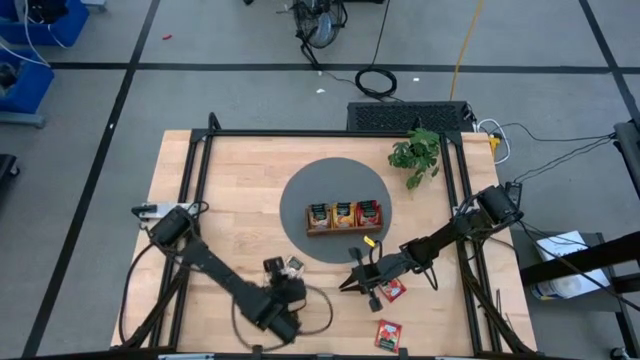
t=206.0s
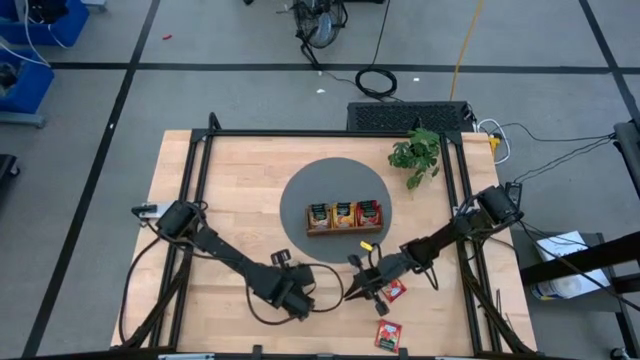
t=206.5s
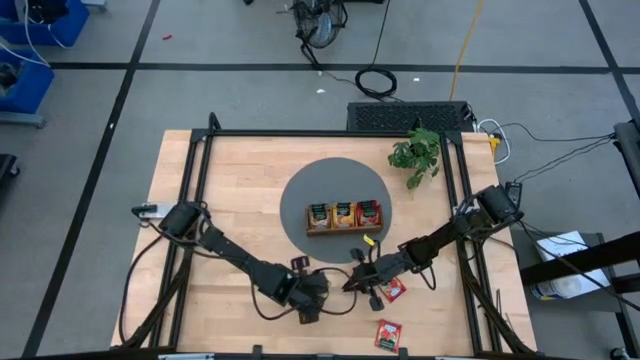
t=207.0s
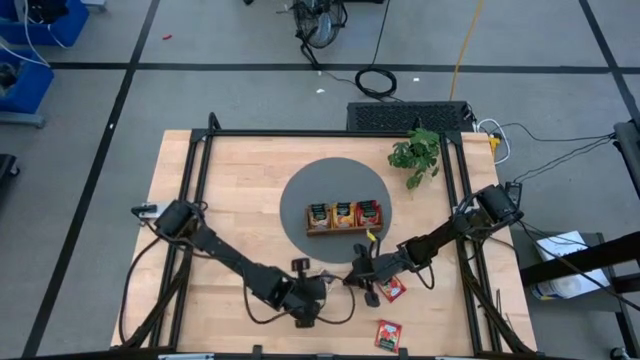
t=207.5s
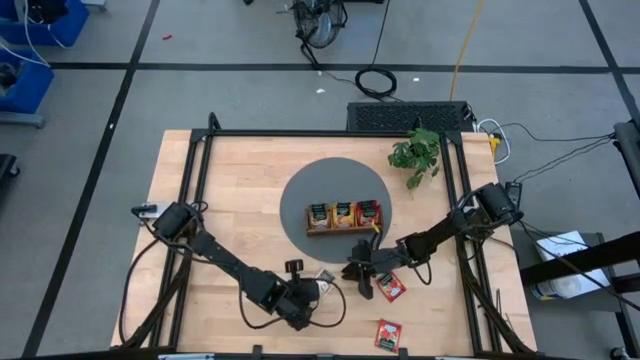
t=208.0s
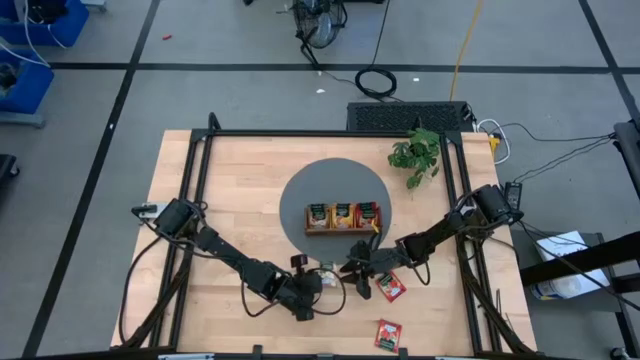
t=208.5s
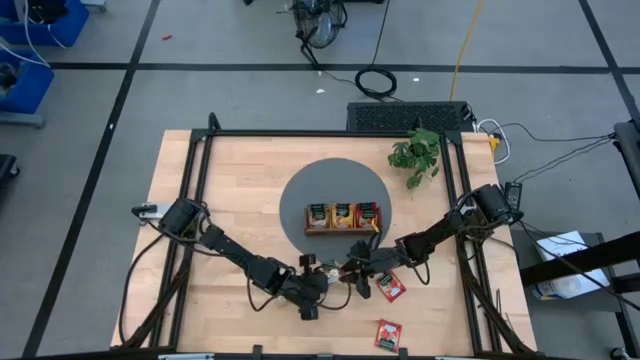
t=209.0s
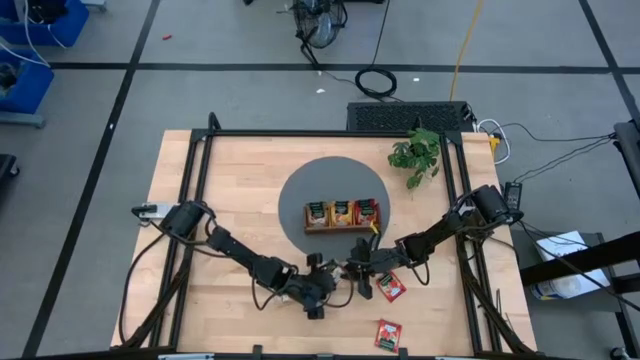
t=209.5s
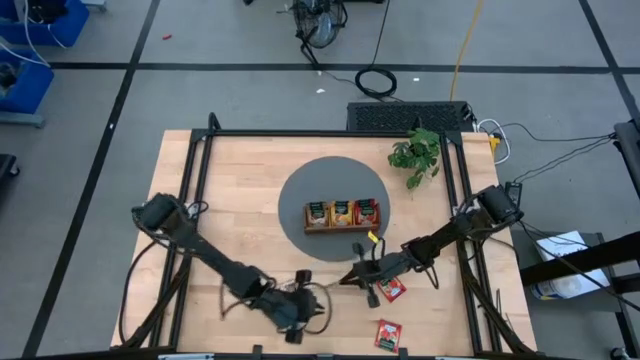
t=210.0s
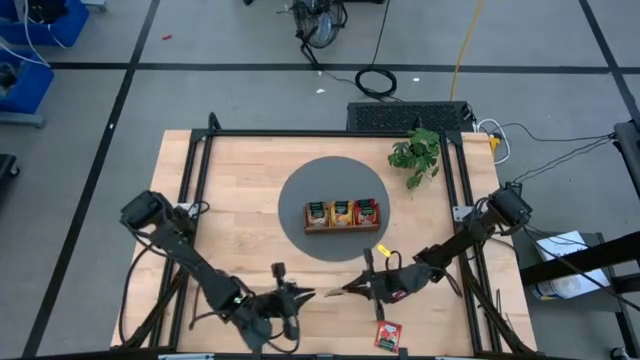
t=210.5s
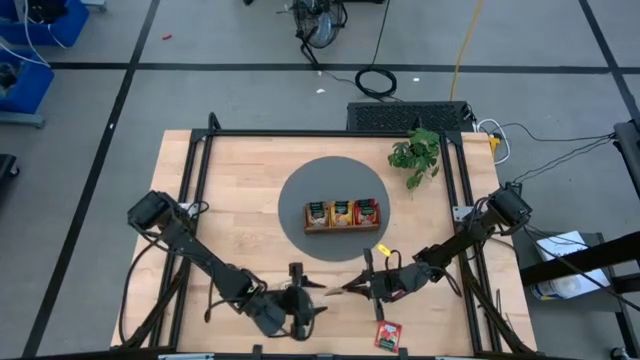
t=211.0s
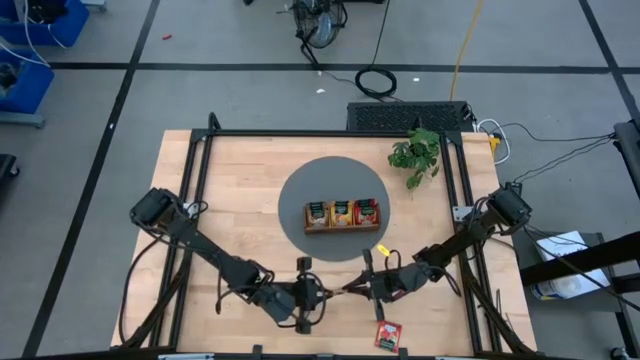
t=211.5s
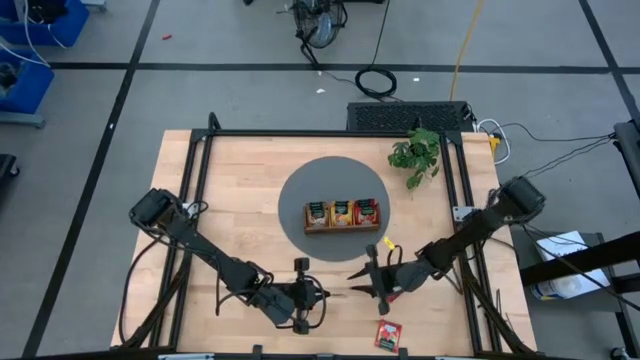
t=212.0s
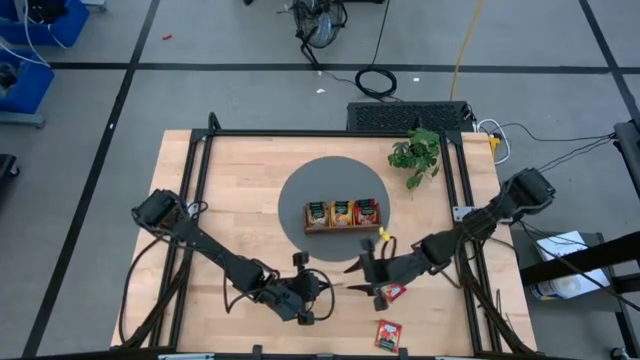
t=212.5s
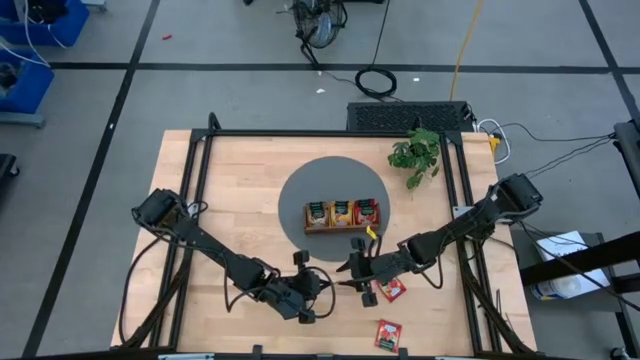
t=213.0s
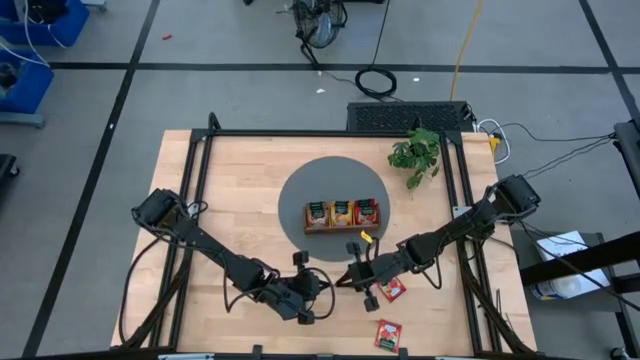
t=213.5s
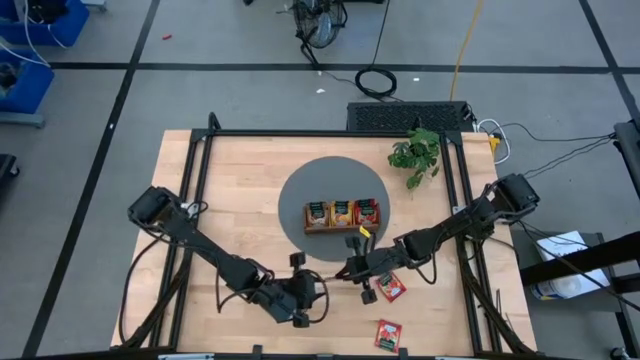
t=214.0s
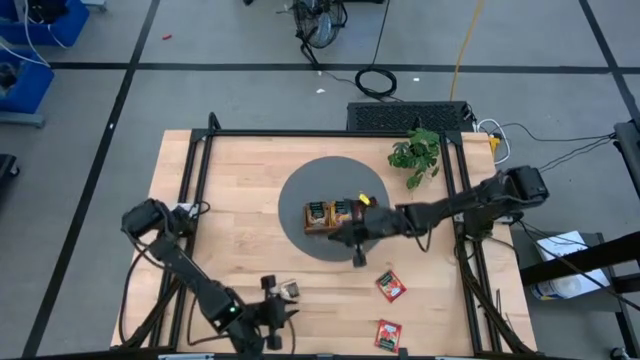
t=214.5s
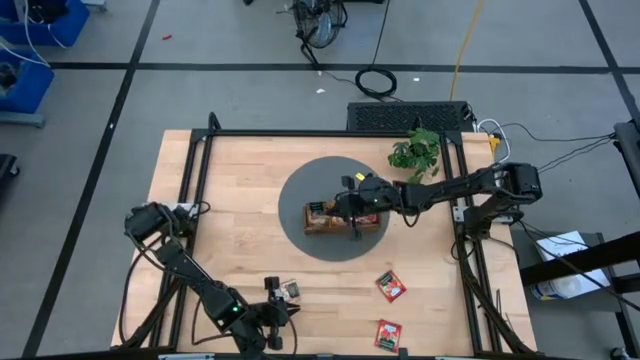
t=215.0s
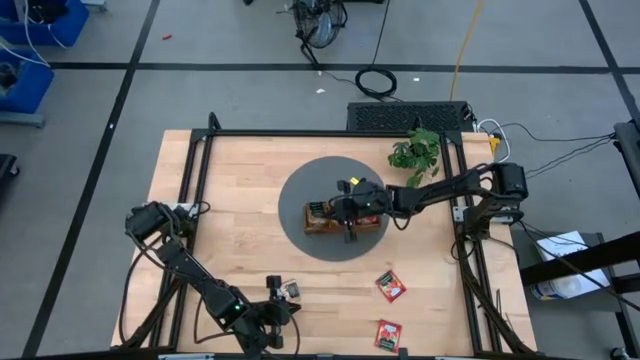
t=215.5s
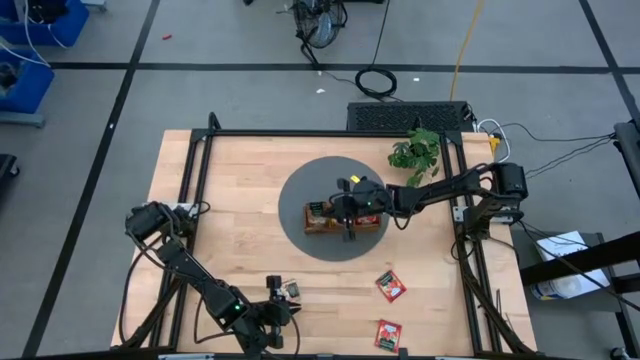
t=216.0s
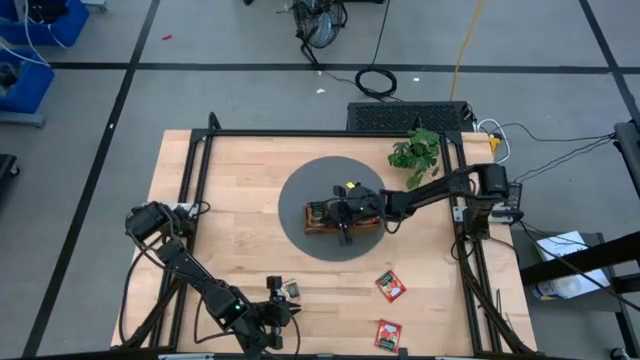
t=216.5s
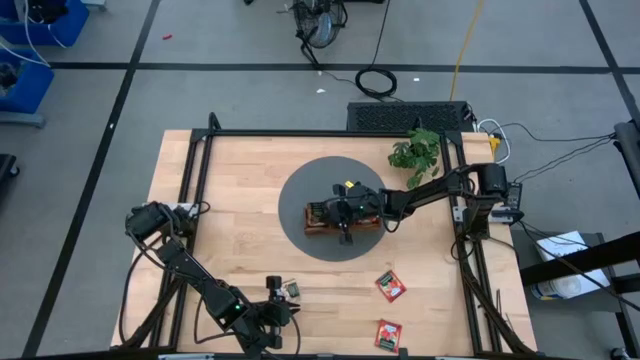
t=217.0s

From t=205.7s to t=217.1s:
Task: Pick & Place Tea
Put the top brown tea bag into the left slot of the wooden organizer

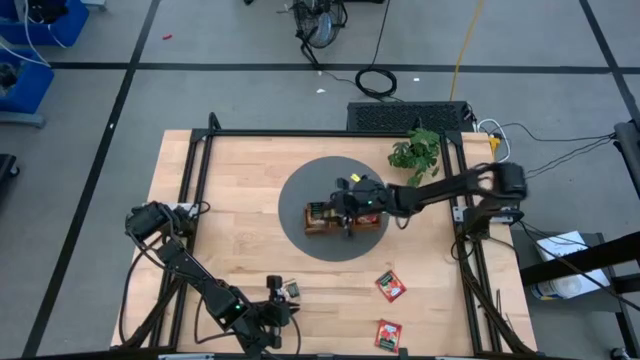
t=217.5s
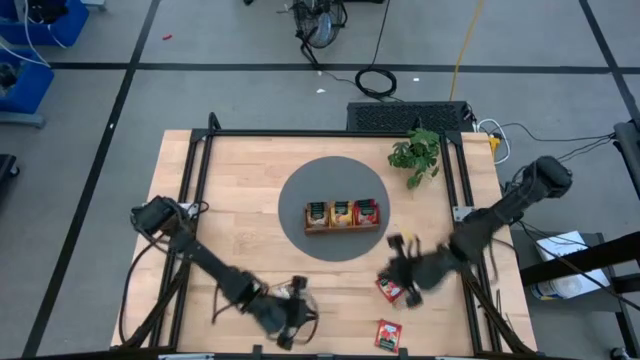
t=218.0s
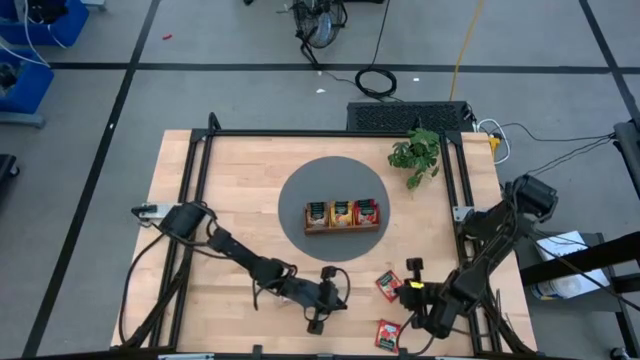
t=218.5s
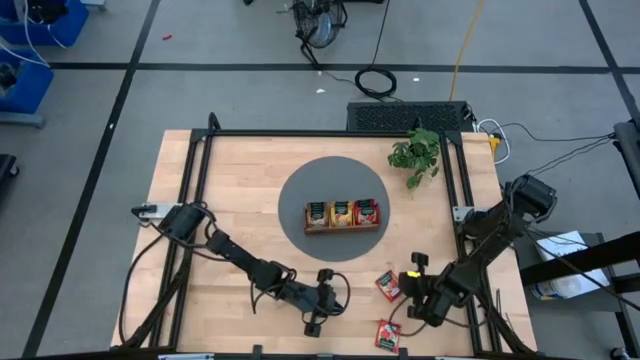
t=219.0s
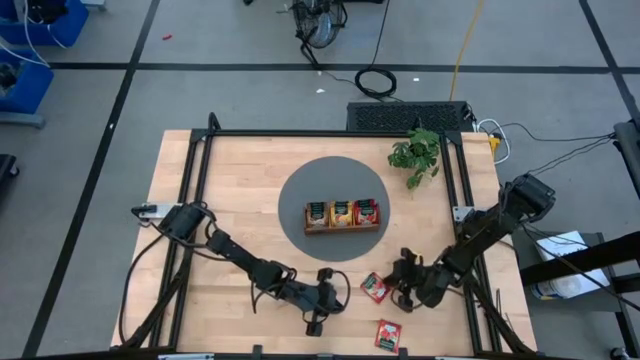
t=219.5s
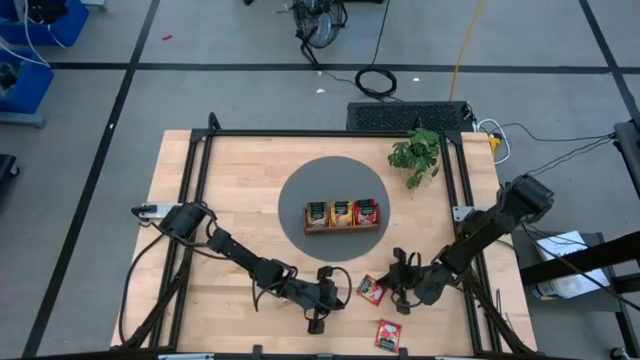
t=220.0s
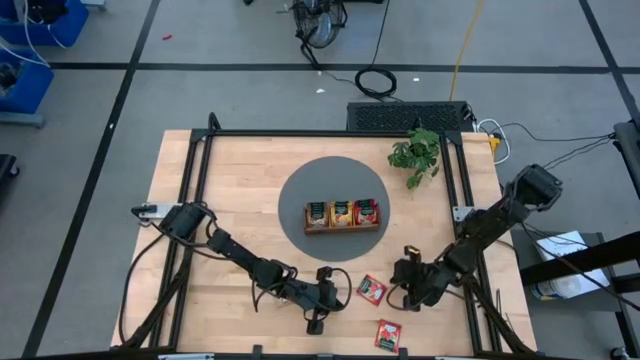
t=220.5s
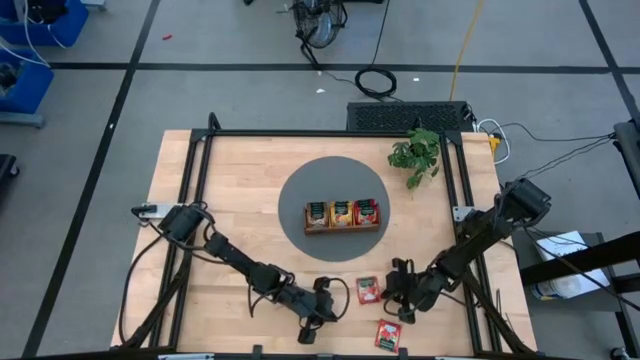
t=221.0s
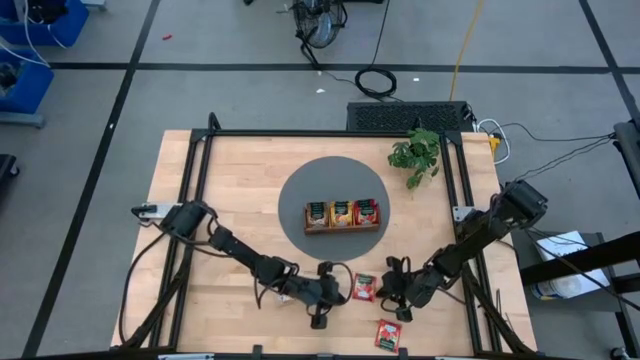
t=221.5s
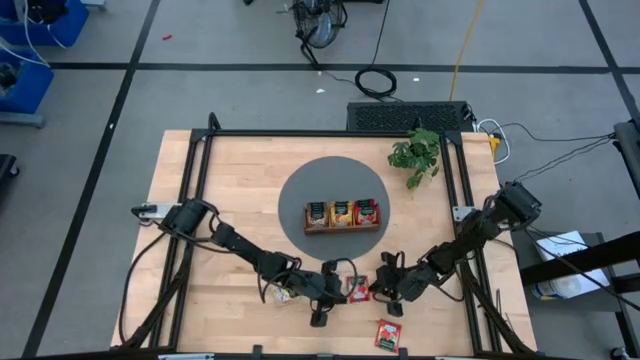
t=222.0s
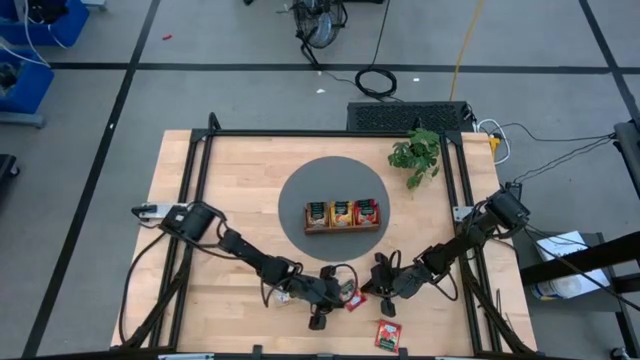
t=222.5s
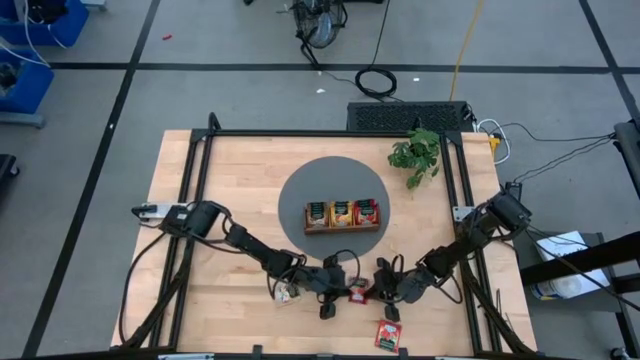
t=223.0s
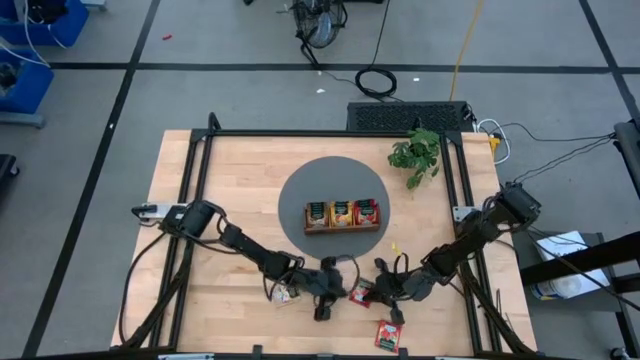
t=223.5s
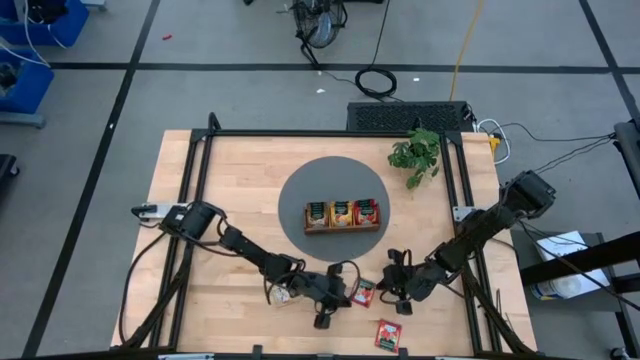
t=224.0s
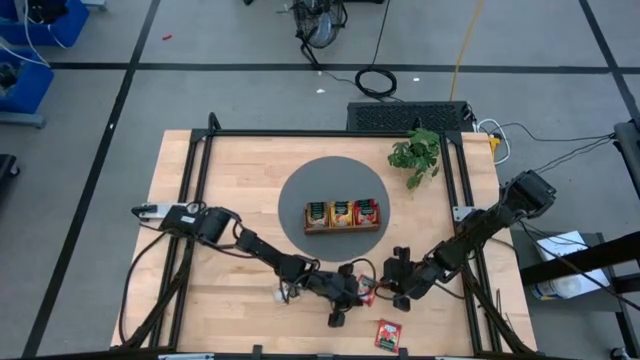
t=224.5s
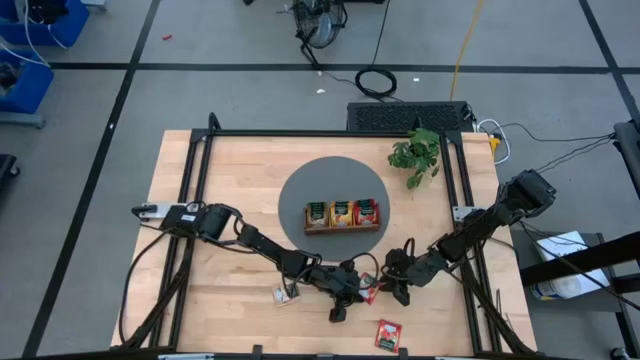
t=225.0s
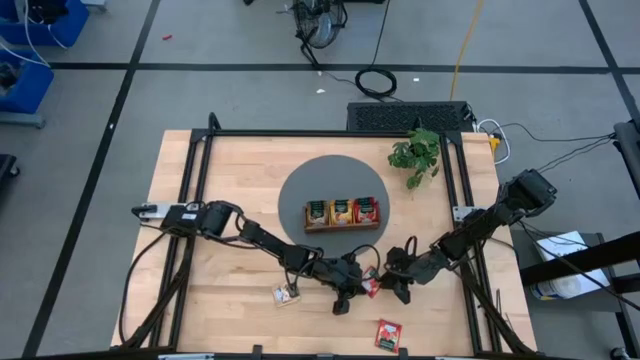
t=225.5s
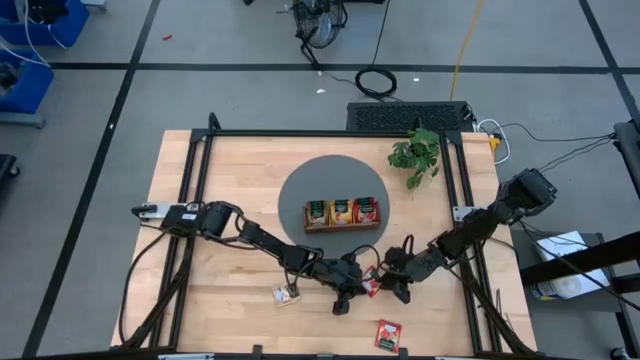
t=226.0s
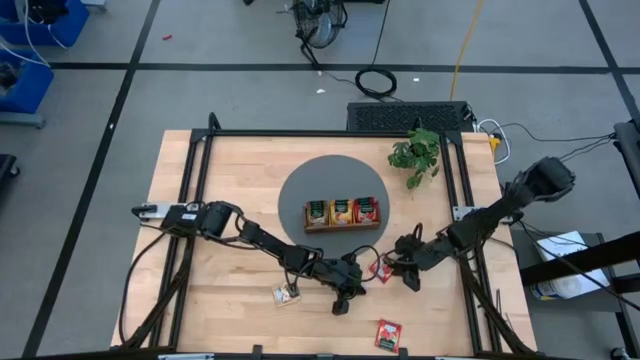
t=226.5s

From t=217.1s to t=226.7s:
Put the top red tea bag into the right slot of the wooden organizer

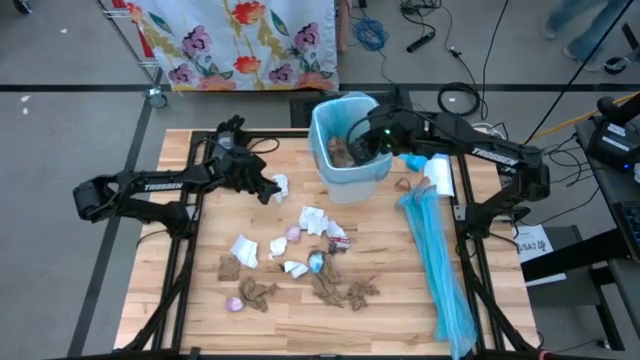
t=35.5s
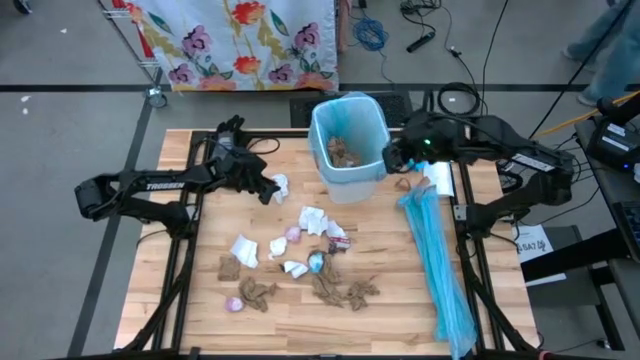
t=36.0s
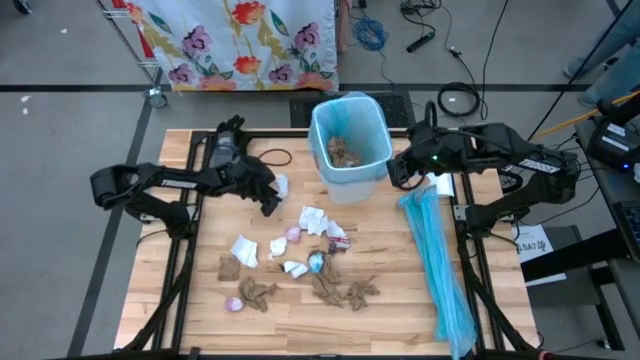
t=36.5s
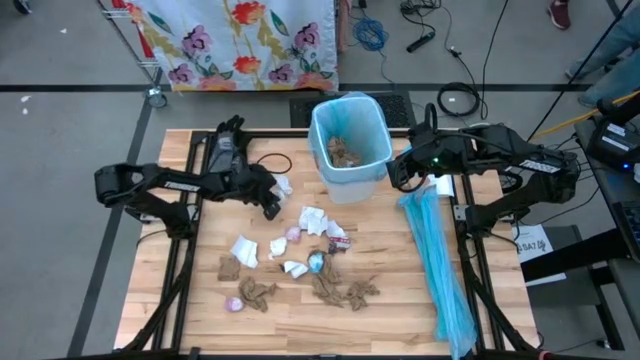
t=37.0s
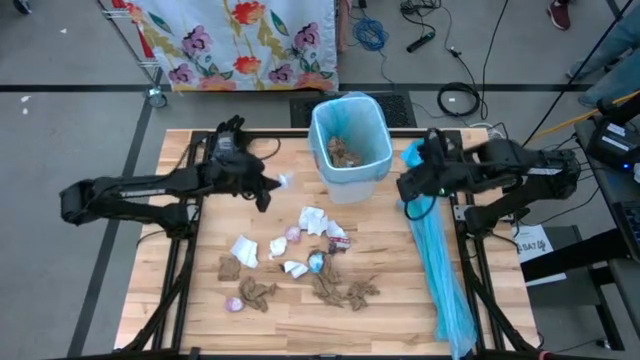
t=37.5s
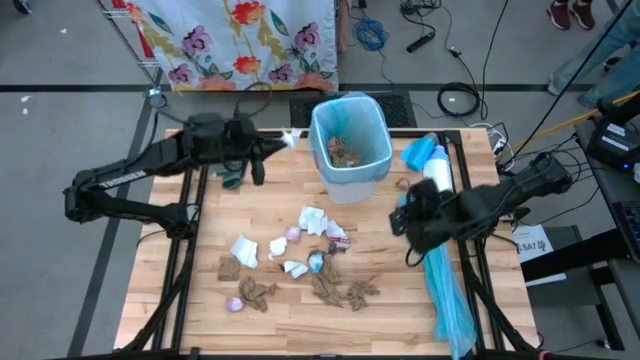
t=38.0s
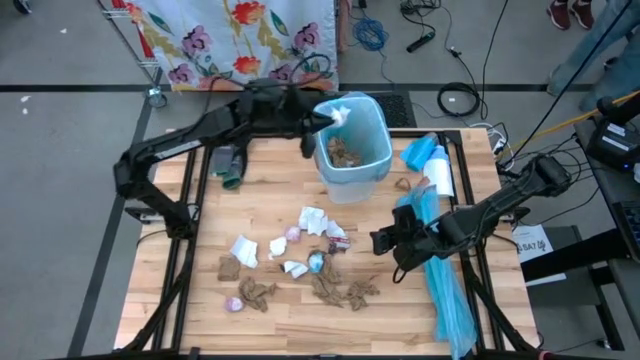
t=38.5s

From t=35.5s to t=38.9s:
Task: place trash/remove bag and relplace
Put the white napkin into the trash bin
